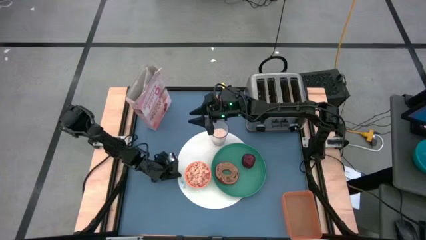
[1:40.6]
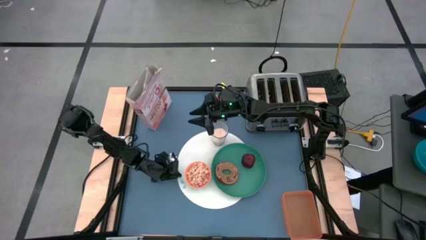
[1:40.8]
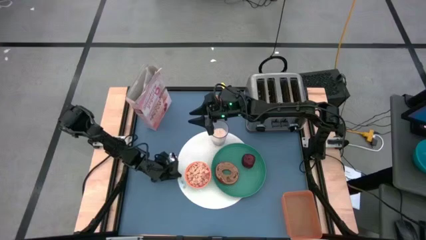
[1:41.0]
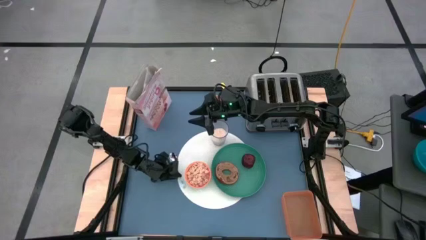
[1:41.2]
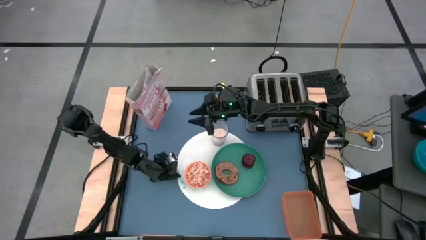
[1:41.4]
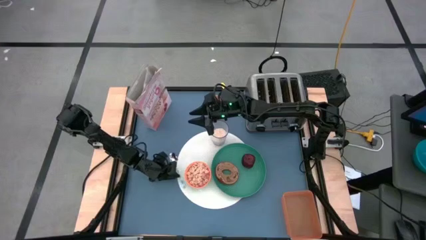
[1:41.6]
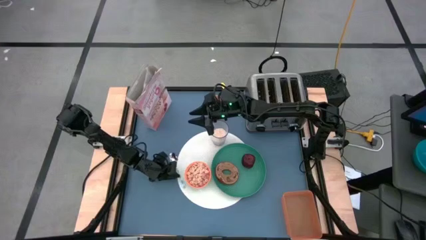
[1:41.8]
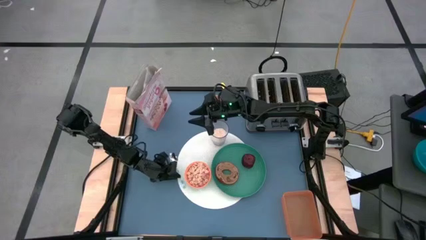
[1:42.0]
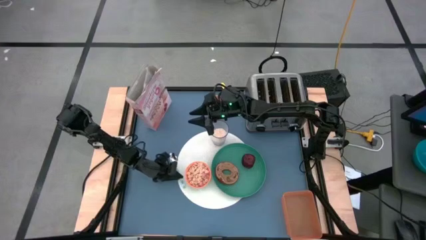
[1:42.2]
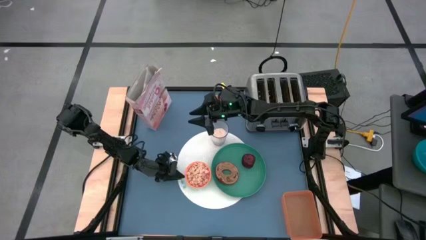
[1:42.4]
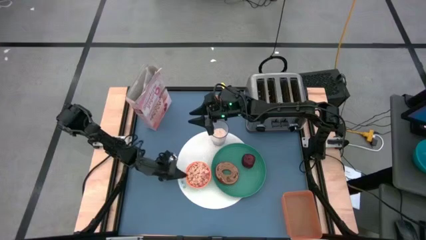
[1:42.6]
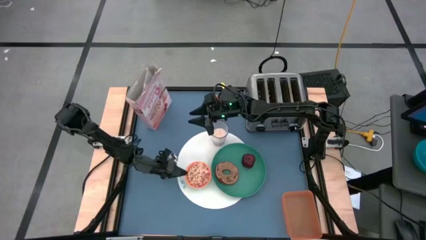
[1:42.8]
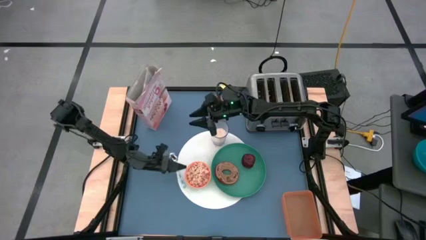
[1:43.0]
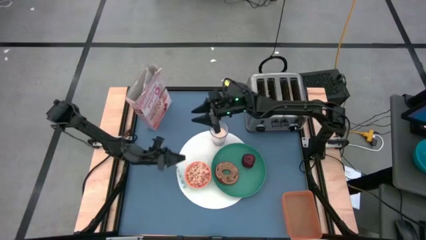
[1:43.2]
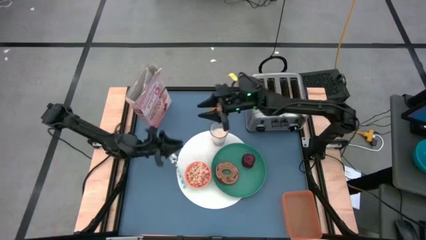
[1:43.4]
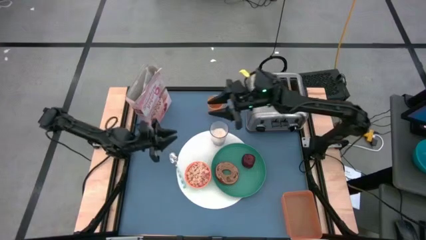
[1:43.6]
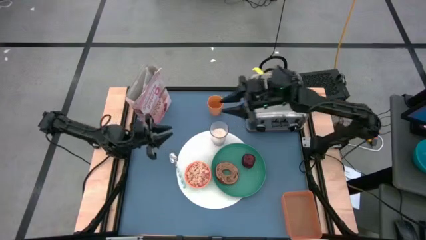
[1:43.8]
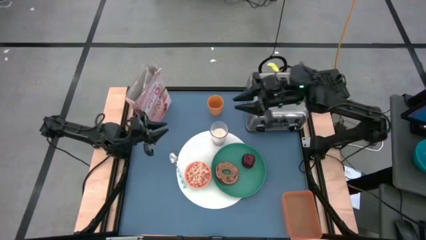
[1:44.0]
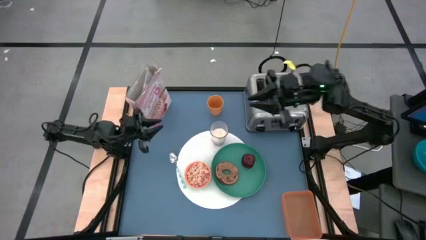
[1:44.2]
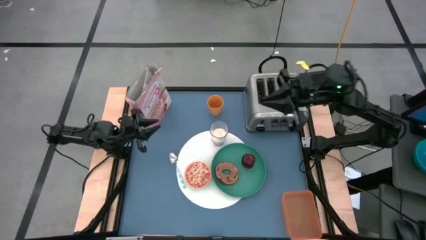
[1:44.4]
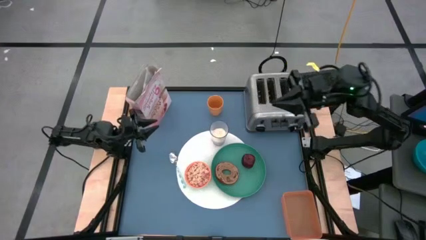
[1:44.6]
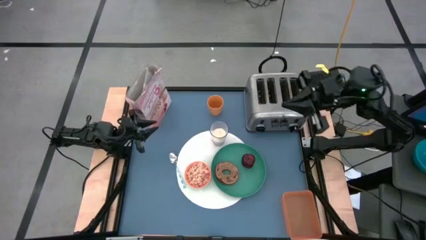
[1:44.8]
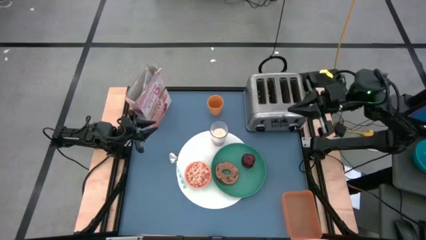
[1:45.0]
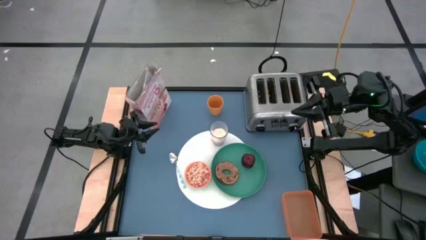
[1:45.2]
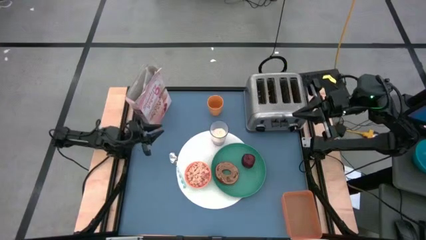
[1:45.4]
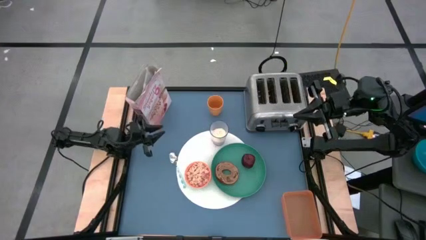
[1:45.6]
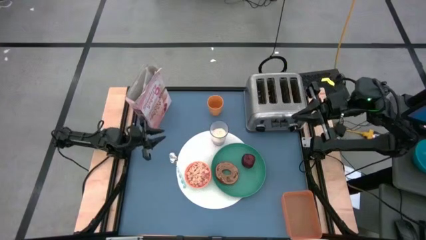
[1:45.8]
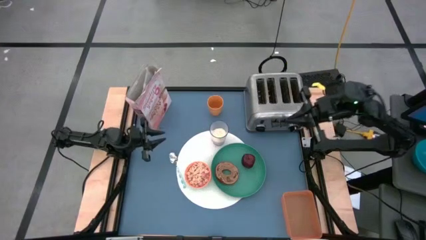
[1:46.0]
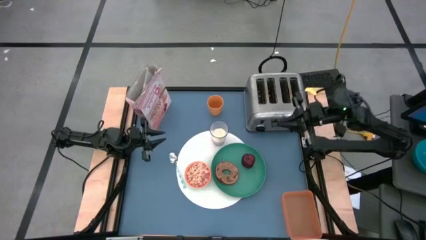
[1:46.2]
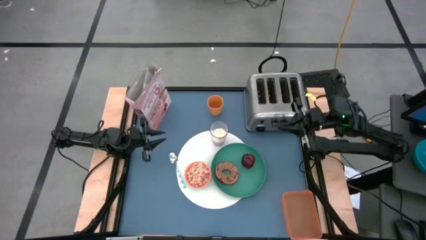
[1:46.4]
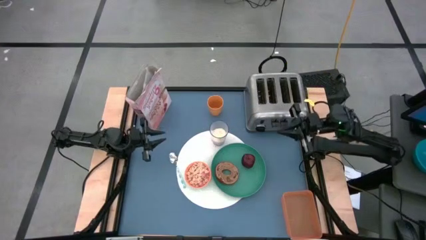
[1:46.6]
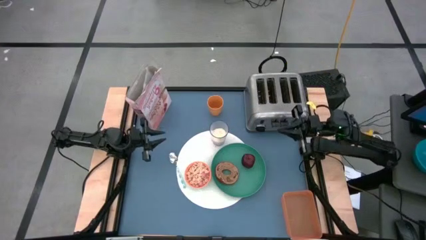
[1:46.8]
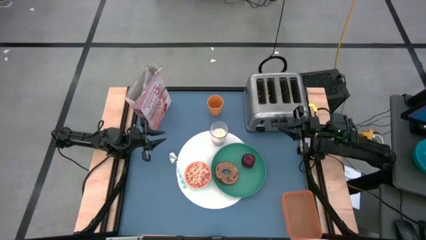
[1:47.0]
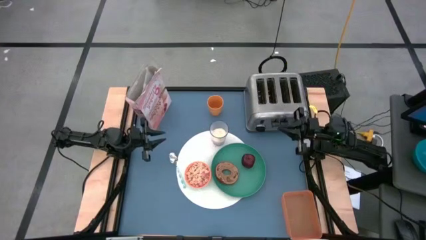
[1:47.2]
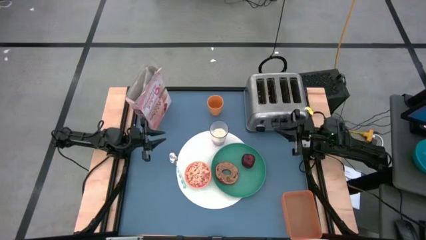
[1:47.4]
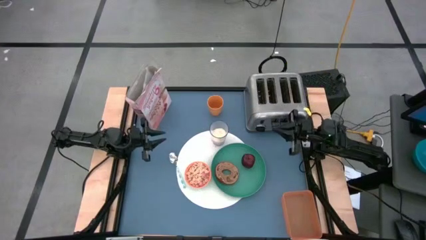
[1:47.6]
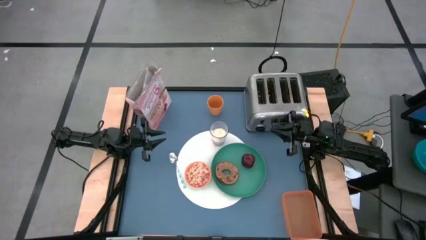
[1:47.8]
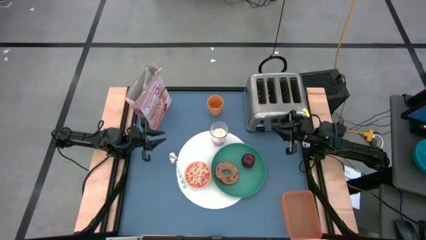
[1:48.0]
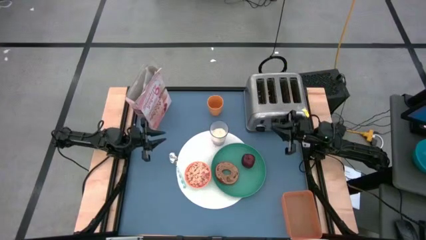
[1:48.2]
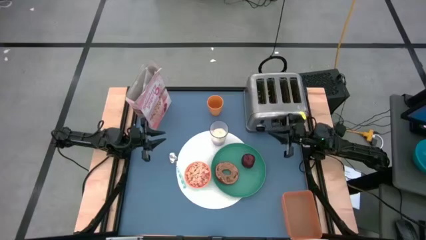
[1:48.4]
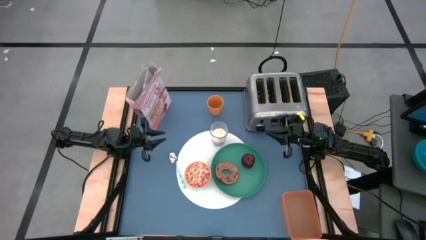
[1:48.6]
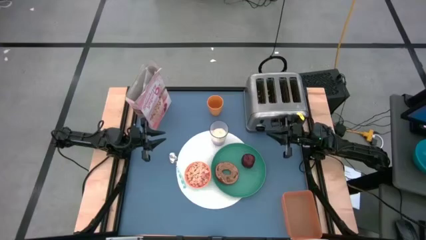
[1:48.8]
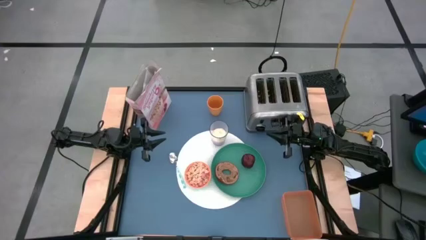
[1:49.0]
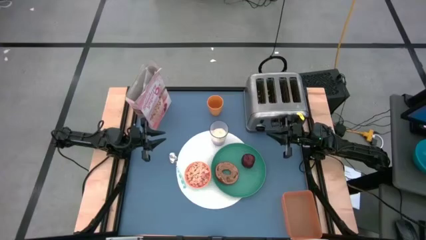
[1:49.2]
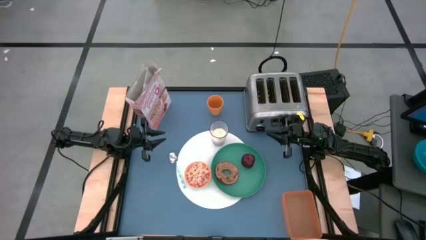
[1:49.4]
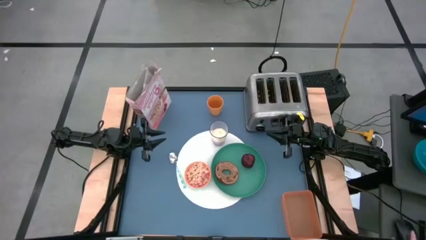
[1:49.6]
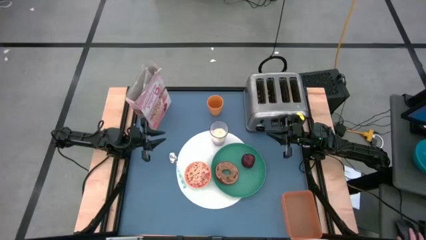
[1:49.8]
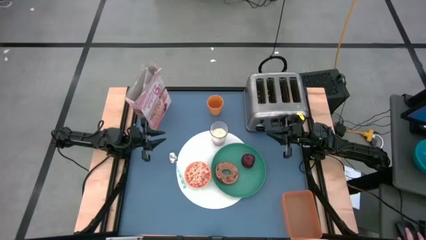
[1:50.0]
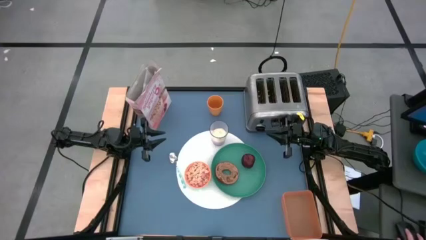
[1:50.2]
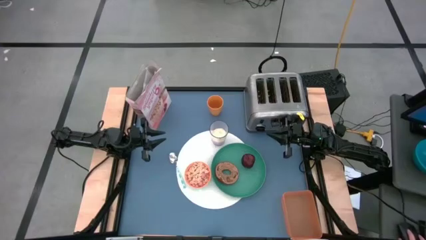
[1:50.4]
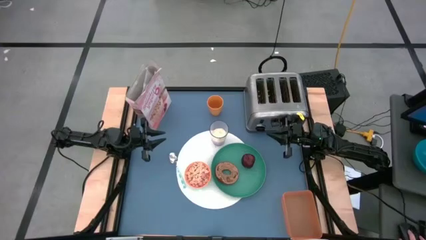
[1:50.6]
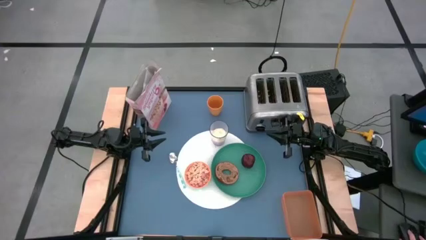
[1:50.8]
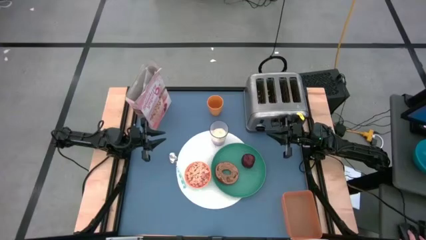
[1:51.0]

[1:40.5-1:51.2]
Task: Arrange a breakfast setting
Return to Home Position

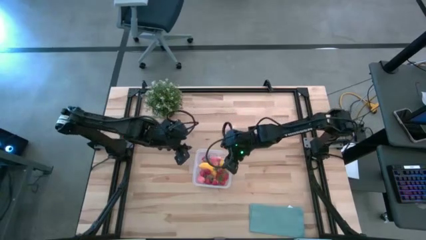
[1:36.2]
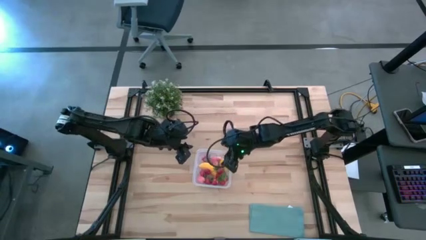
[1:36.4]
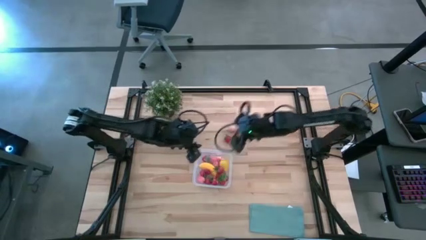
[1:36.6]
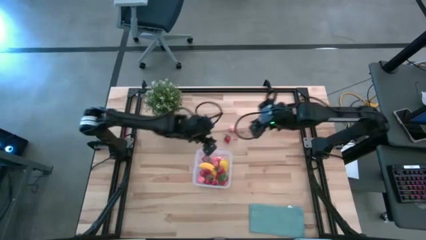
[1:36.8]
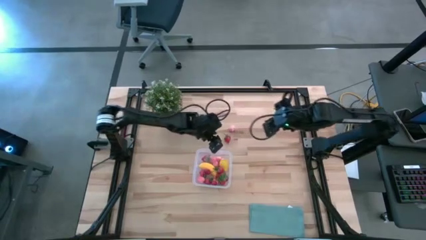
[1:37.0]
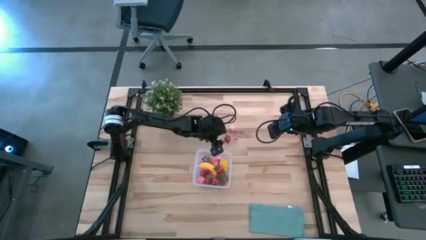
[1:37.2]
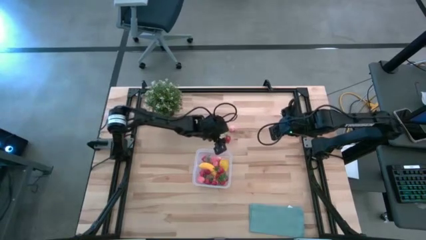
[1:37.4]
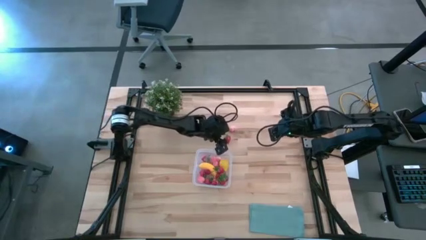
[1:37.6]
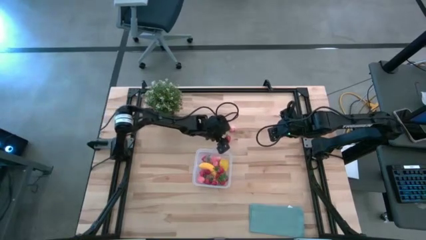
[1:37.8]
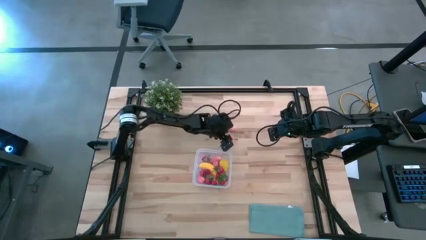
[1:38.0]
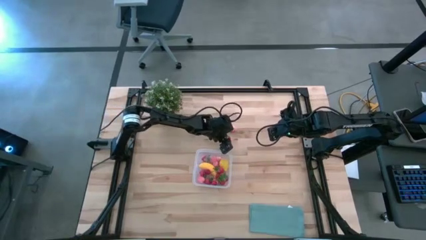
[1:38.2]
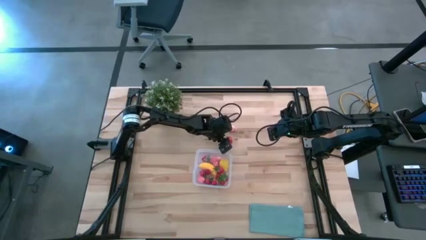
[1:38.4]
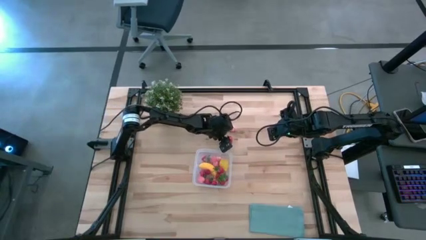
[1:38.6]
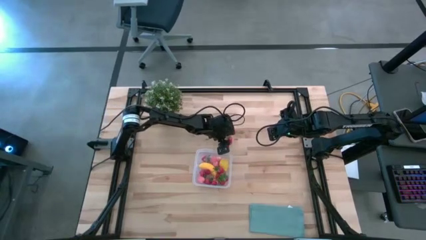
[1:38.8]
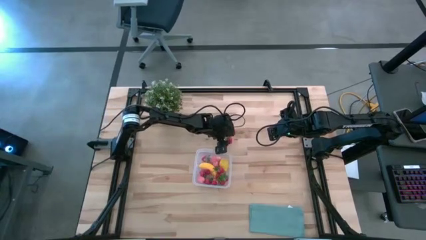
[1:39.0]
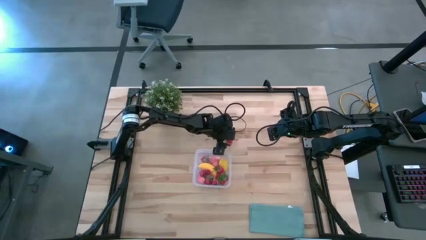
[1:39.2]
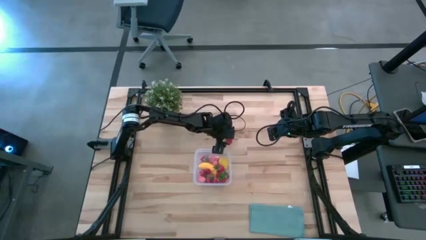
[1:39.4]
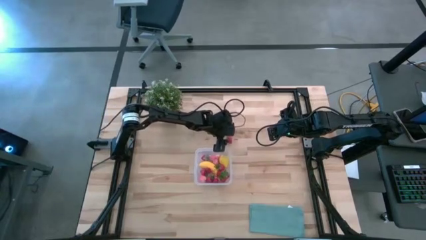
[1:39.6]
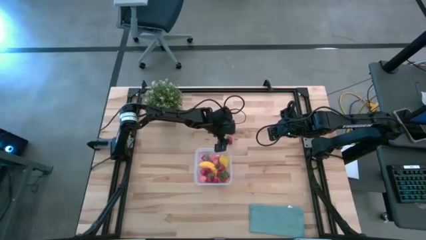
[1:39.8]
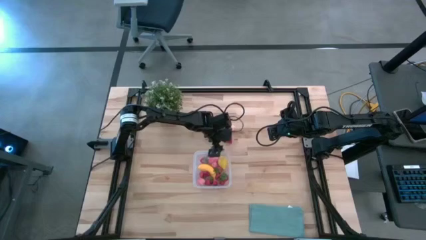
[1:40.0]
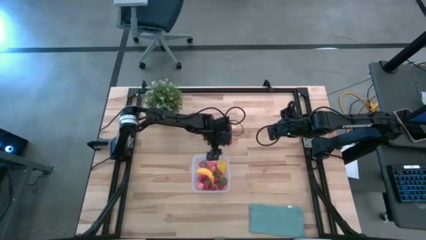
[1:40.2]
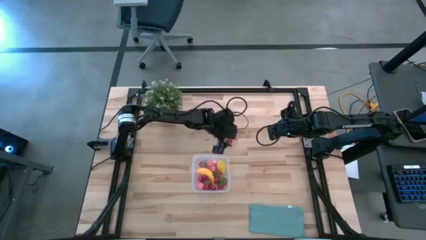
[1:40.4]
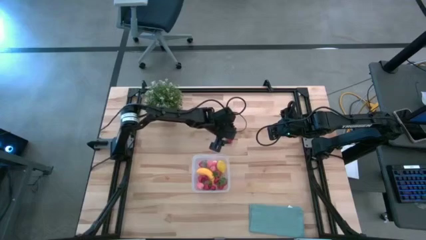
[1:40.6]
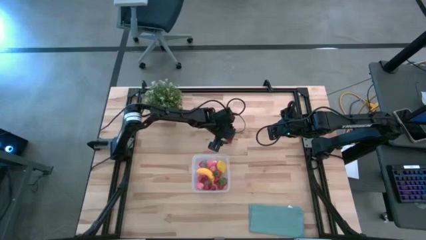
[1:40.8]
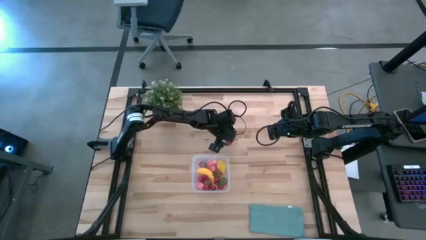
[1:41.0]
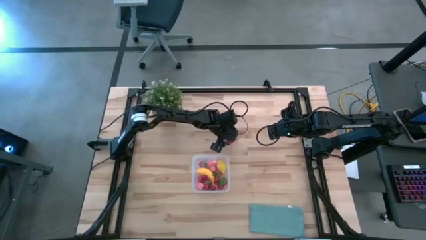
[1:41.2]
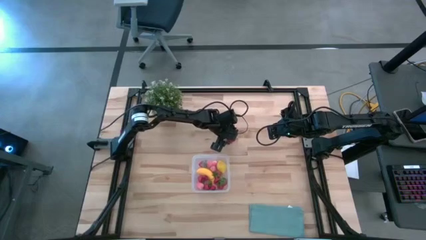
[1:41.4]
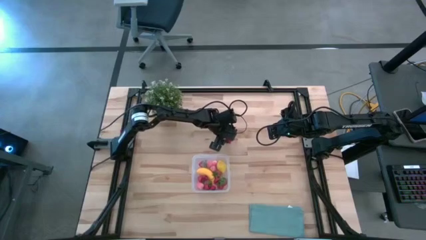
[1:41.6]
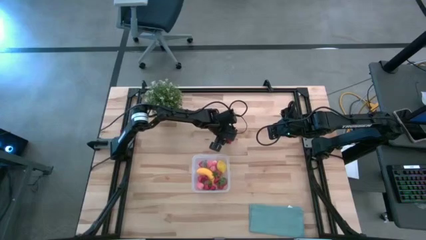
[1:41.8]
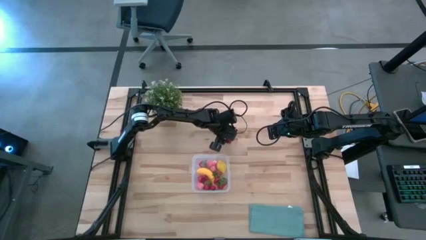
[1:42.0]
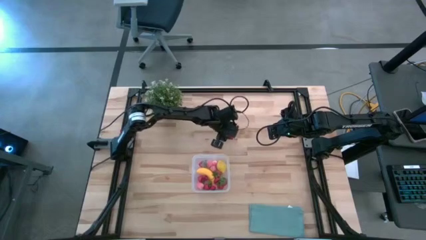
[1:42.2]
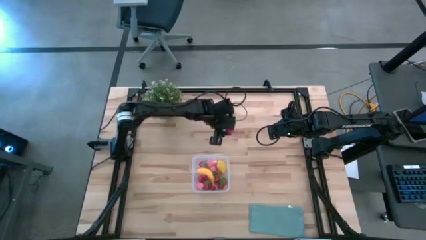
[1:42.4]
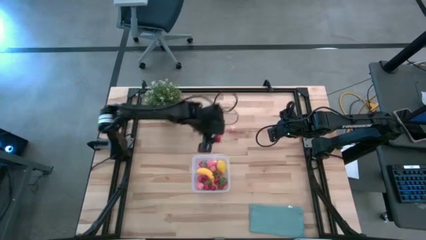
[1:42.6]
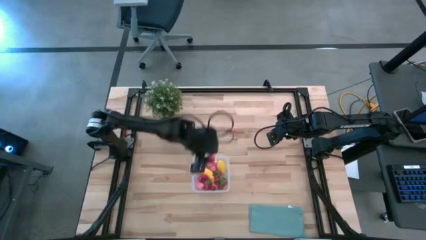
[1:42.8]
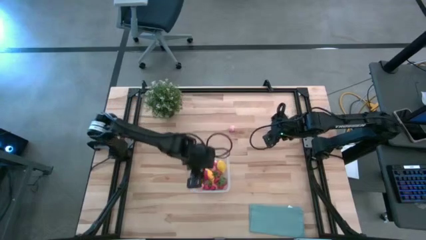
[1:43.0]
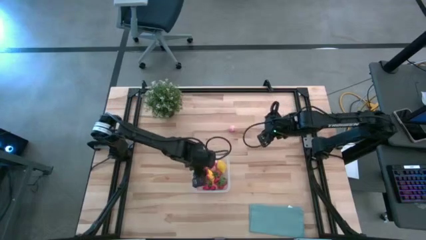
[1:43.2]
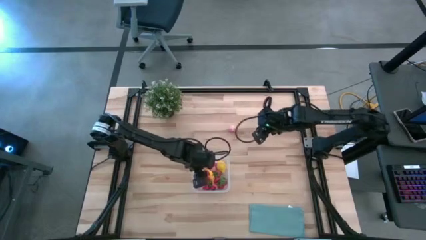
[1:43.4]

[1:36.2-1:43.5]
Task: Pick and placing Produce into tupperware
Put the red strawberry into the transparent container
